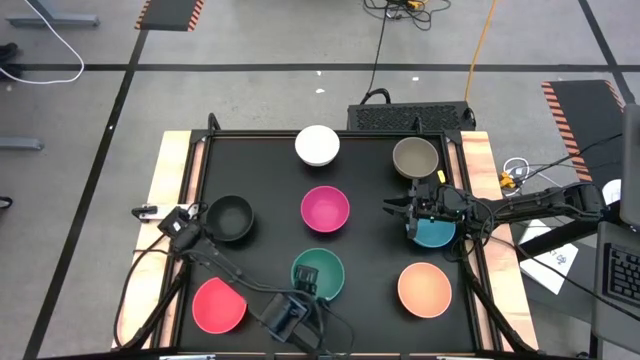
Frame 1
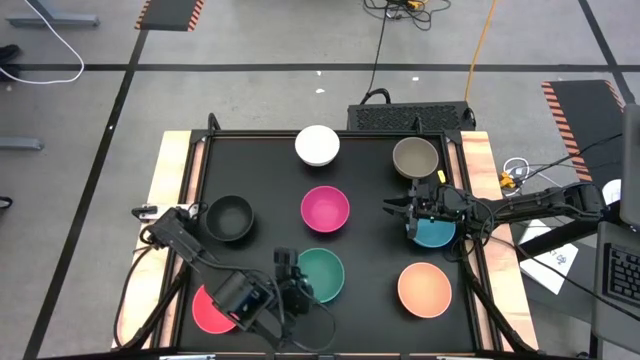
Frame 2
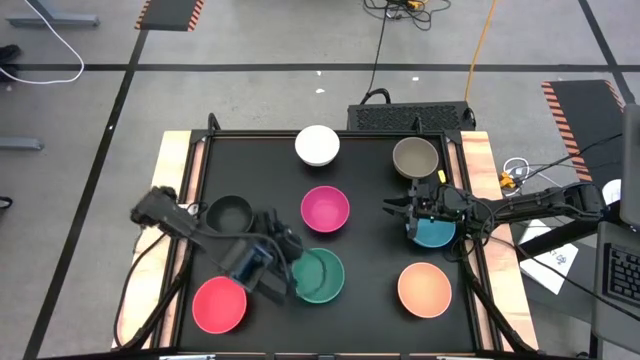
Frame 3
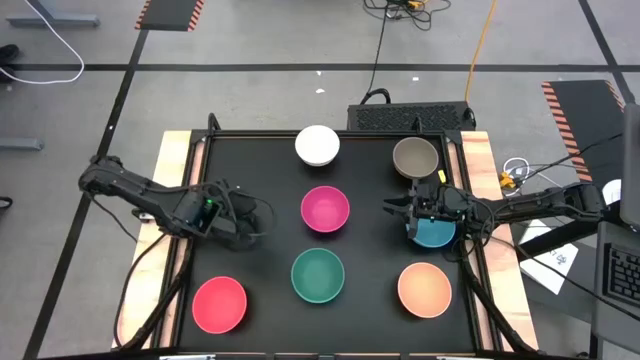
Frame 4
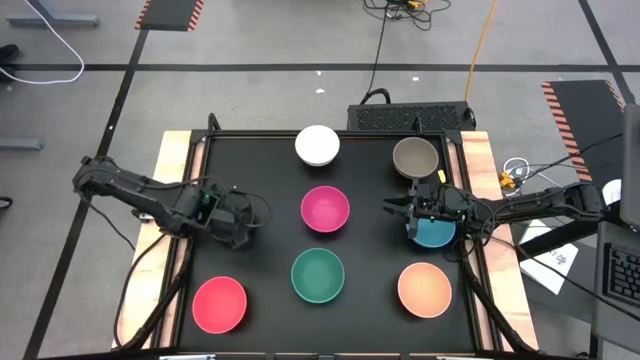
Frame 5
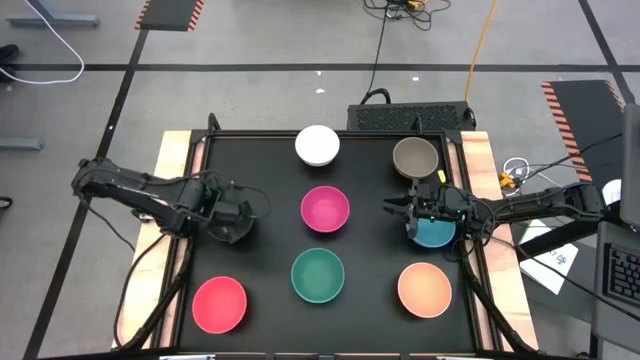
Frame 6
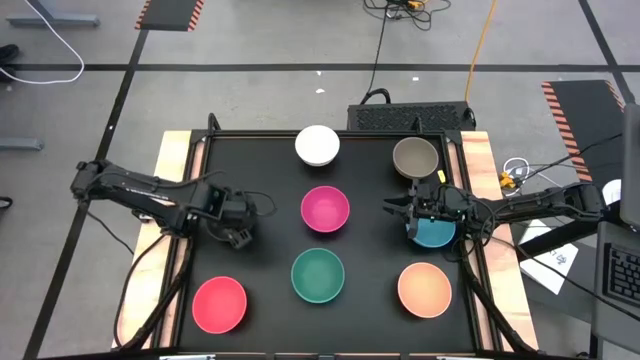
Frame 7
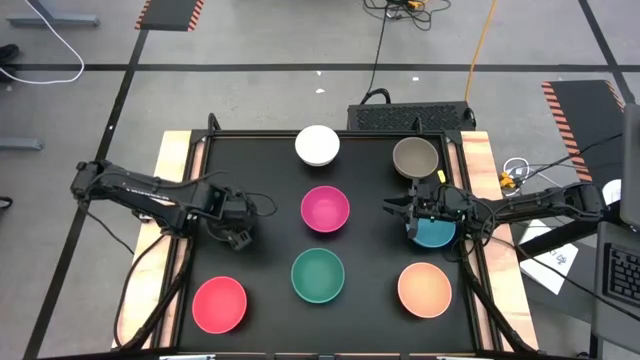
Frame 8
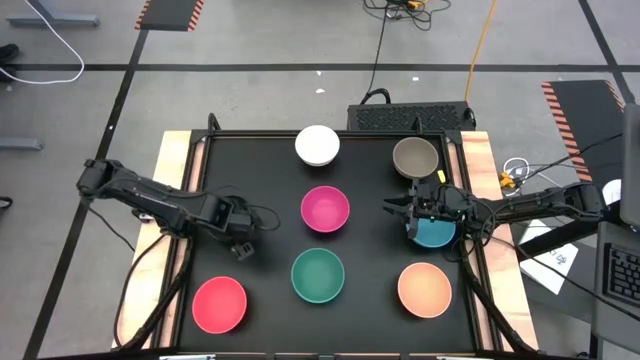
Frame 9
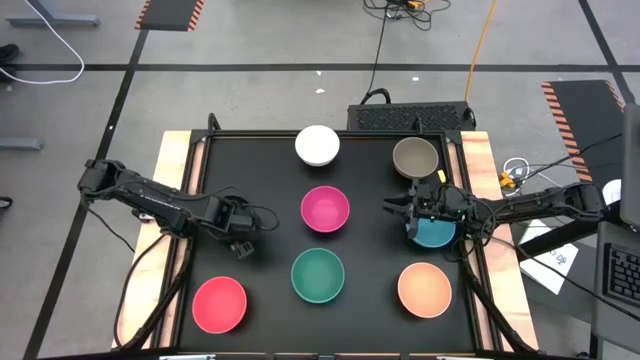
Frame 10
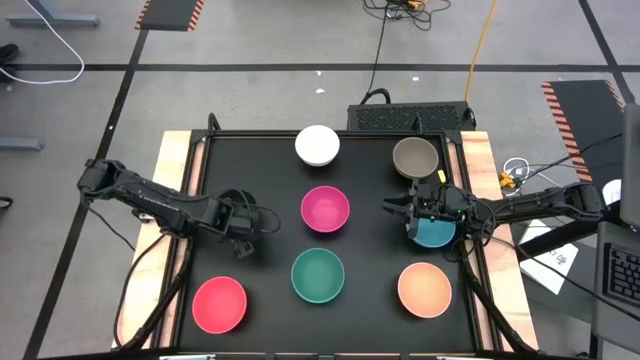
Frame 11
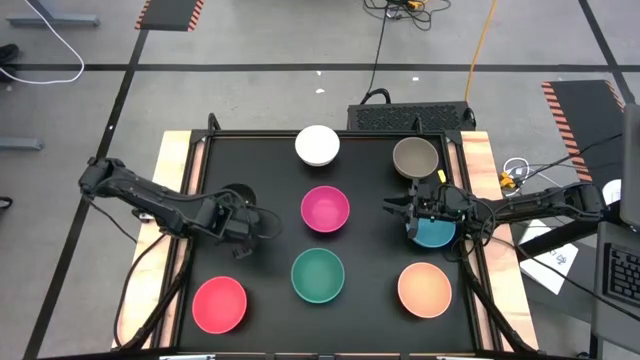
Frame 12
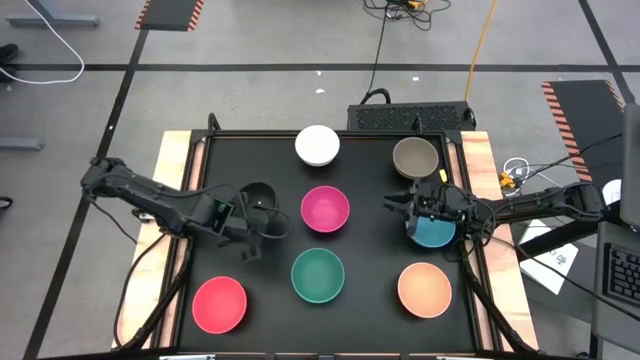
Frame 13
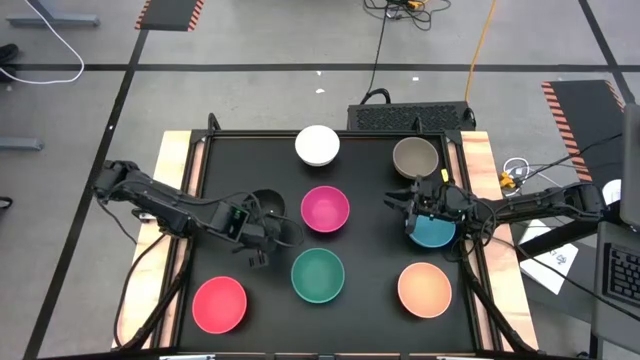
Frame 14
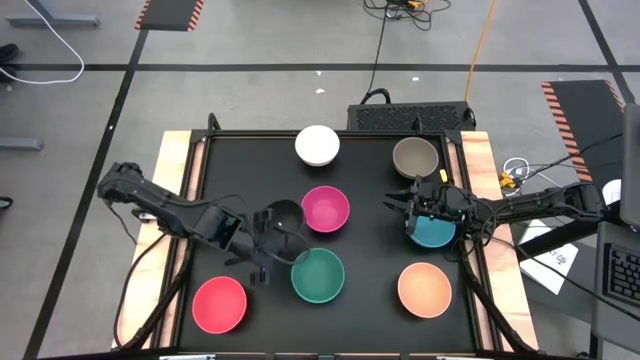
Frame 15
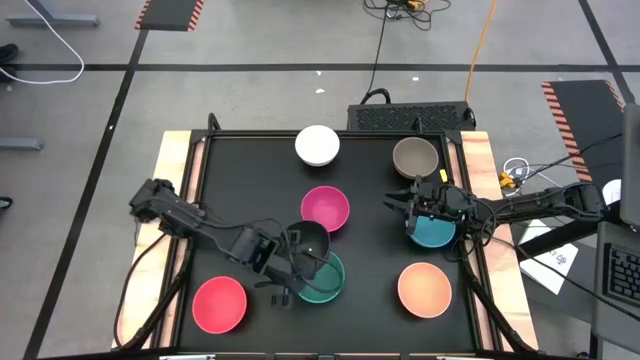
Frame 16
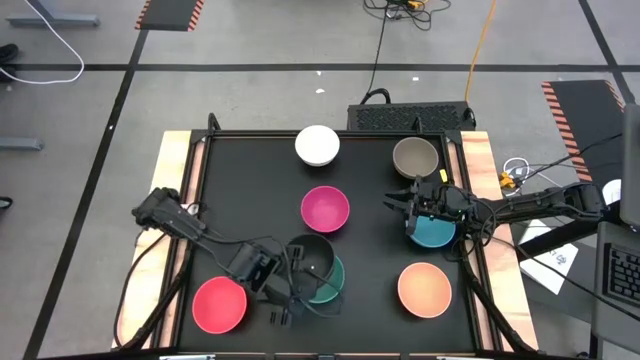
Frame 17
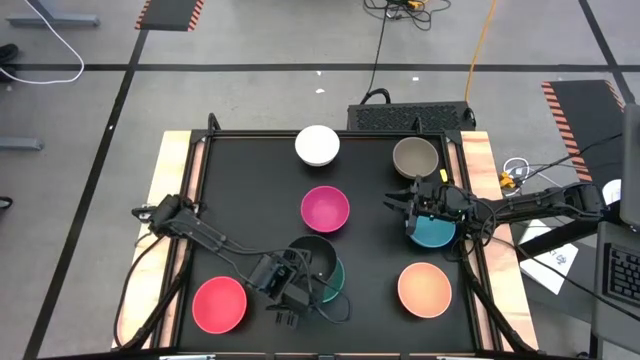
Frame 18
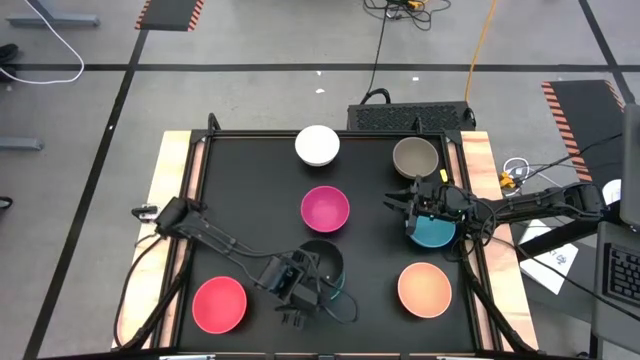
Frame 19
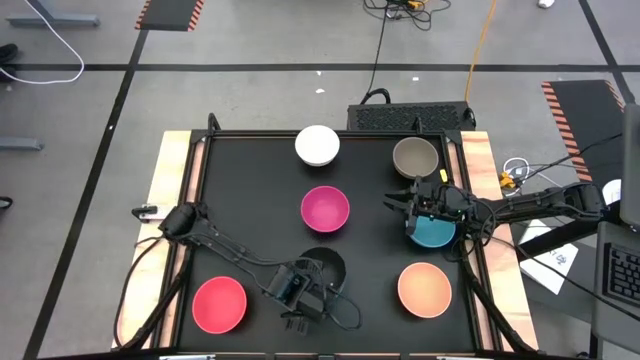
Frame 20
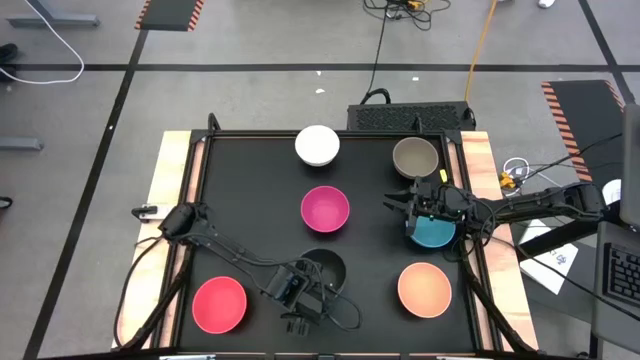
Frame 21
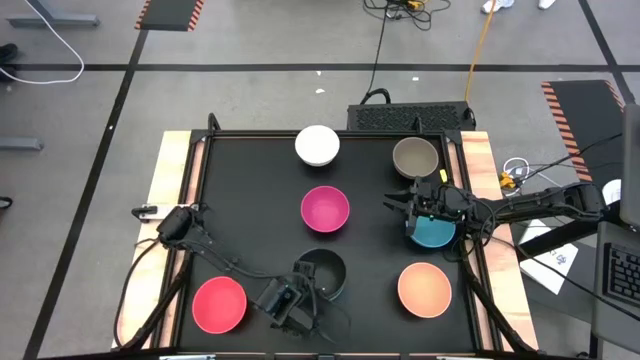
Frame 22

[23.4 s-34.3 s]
Task: Nest bowls inside each other
Stack the black bowl on the dark green bowl

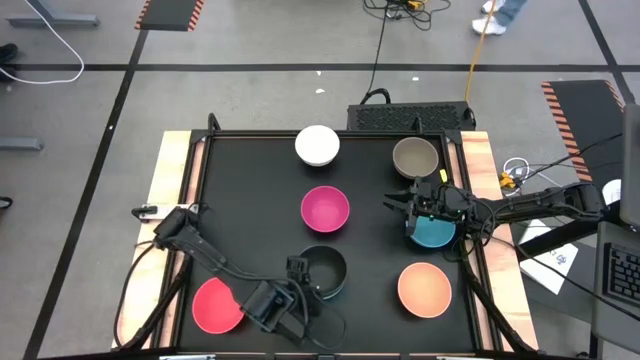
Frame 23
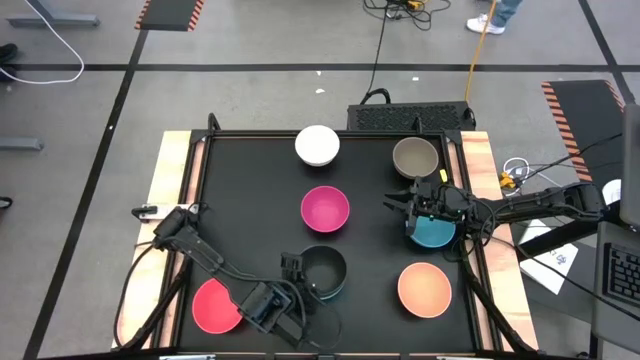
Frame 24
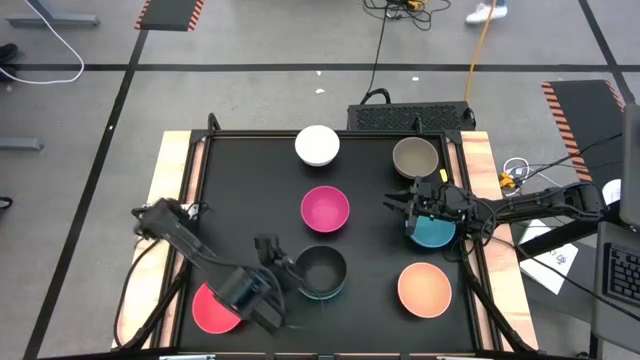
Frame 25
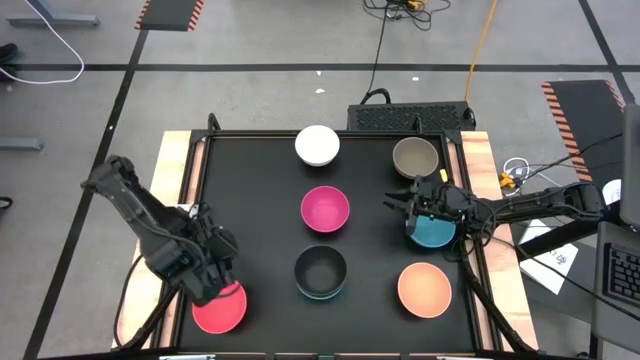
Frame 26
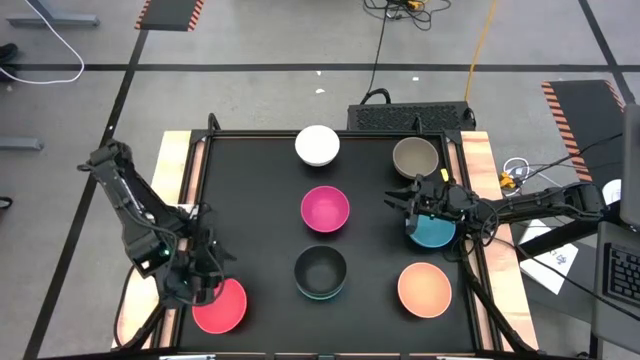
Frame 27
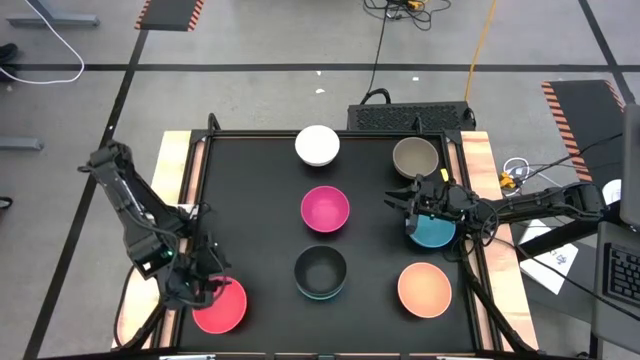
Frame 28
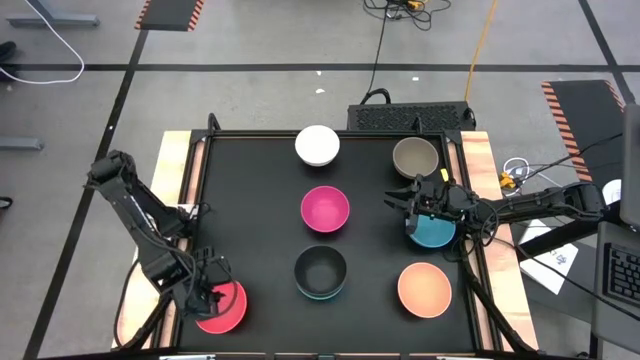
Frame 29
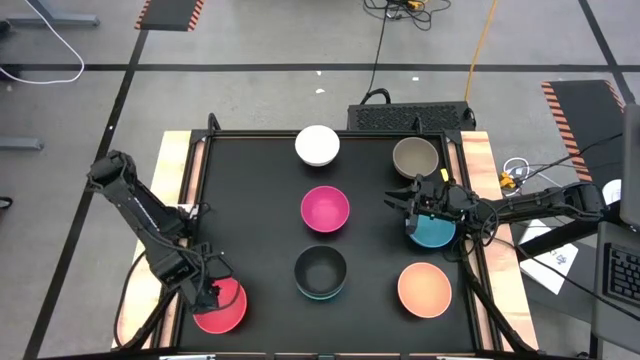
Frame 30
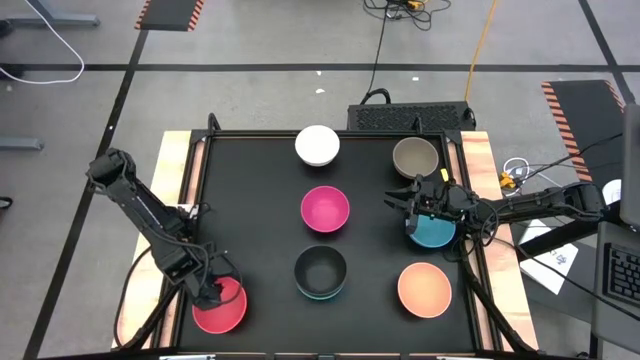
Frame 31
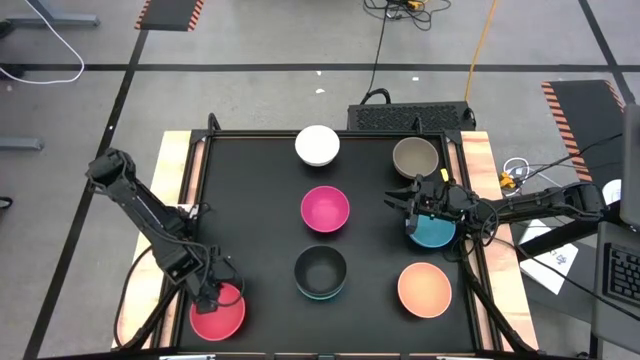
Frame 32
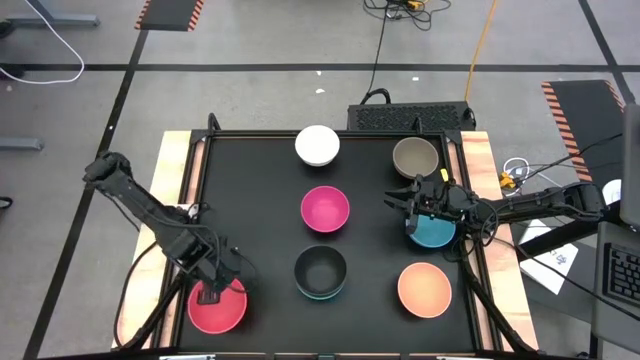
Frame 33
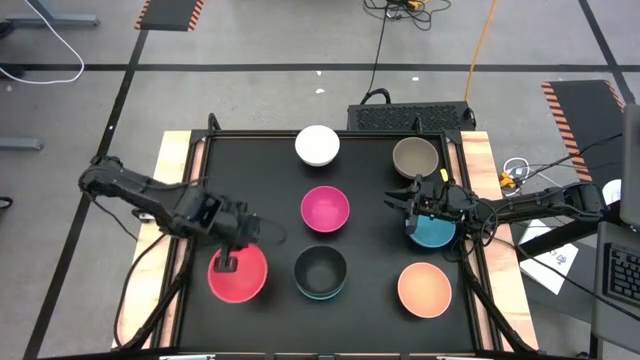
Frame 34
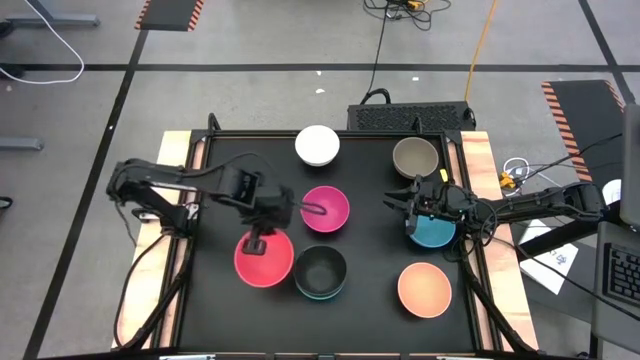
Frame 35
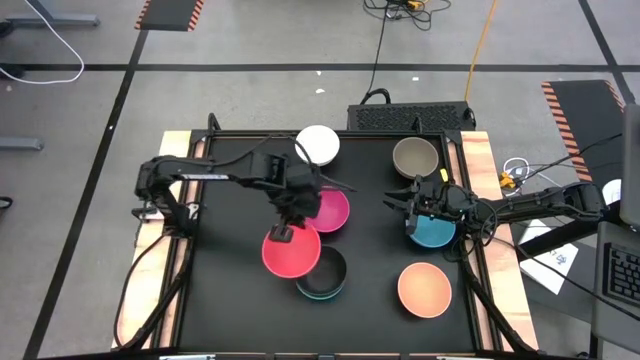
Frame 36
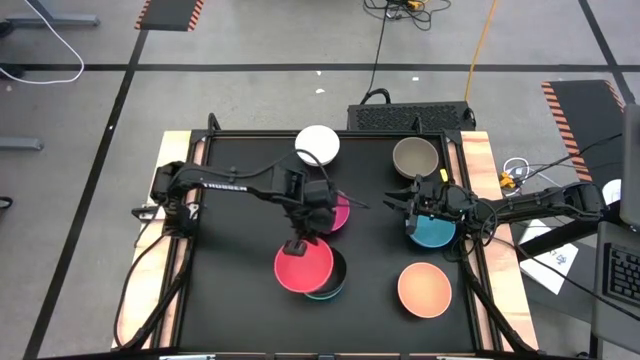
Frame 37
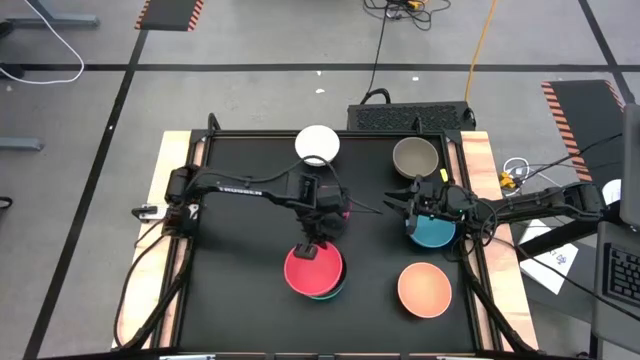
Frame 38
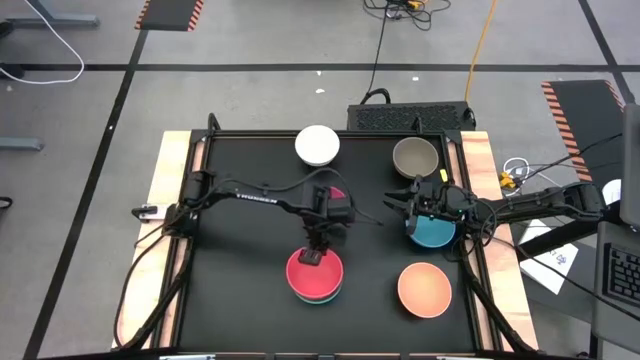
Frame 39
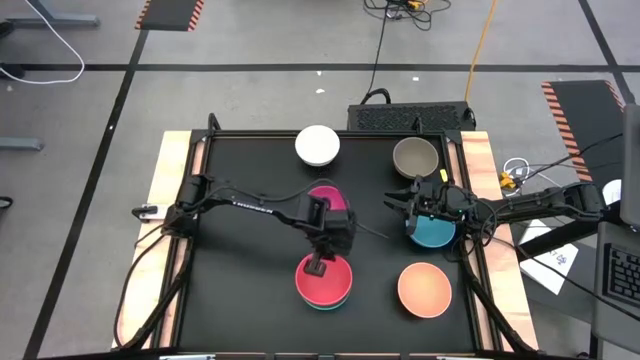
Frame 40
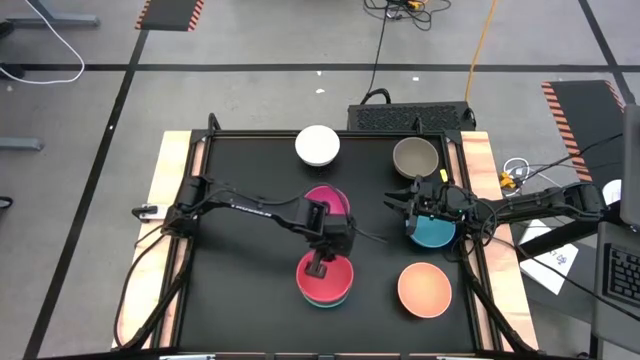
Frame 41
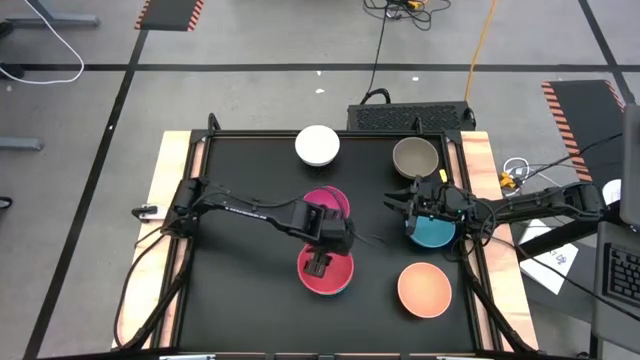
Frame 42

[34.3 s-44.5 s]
Stack the orange bowl on the black bowl
